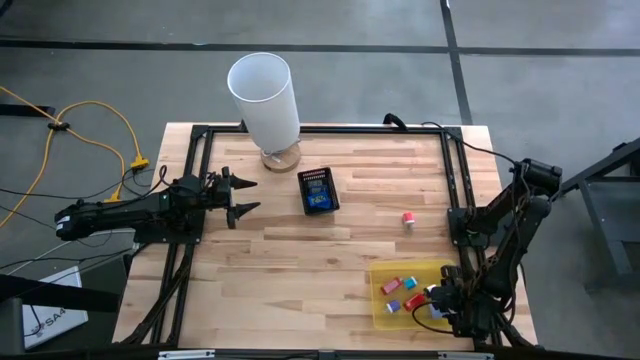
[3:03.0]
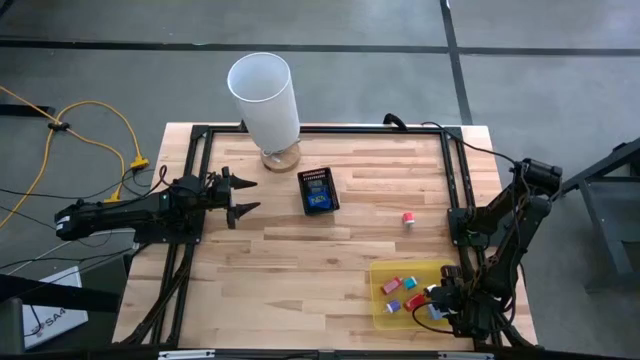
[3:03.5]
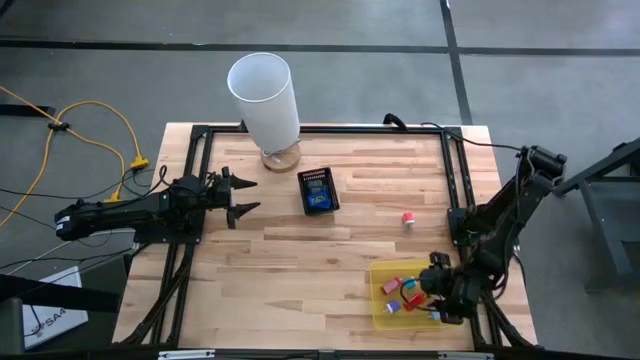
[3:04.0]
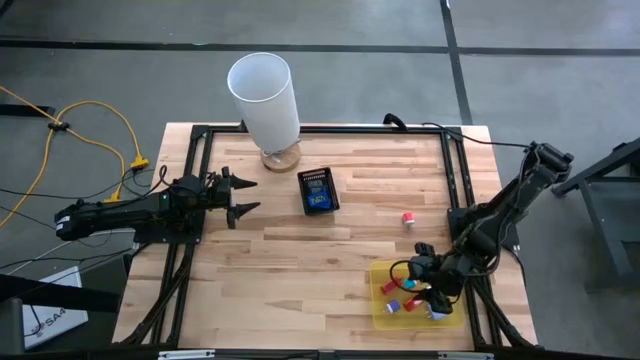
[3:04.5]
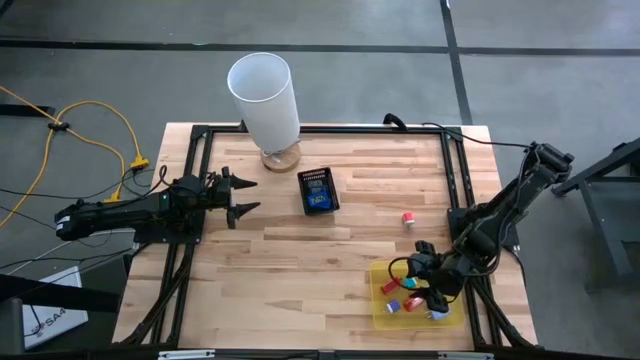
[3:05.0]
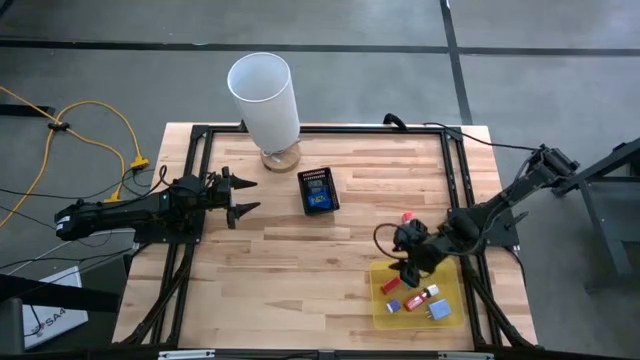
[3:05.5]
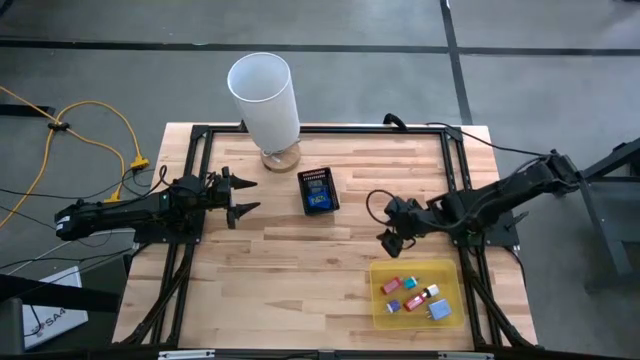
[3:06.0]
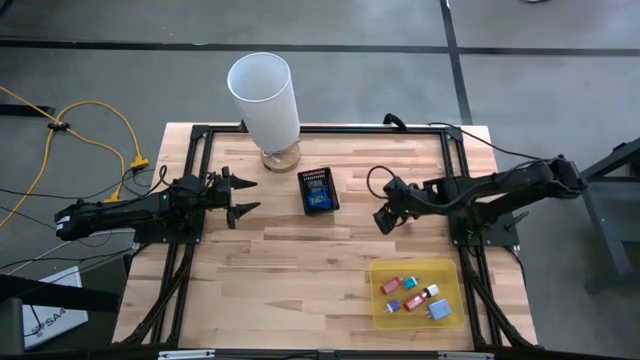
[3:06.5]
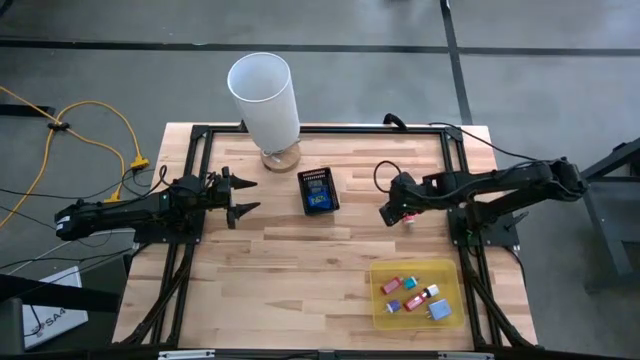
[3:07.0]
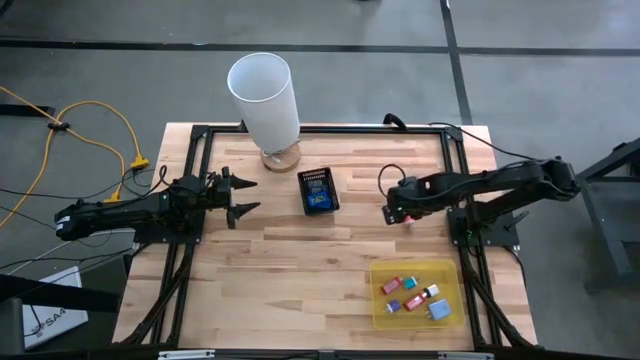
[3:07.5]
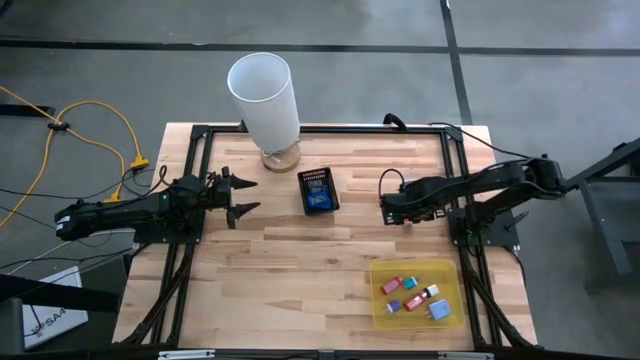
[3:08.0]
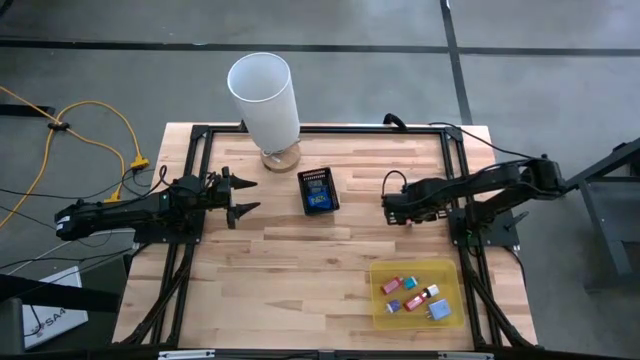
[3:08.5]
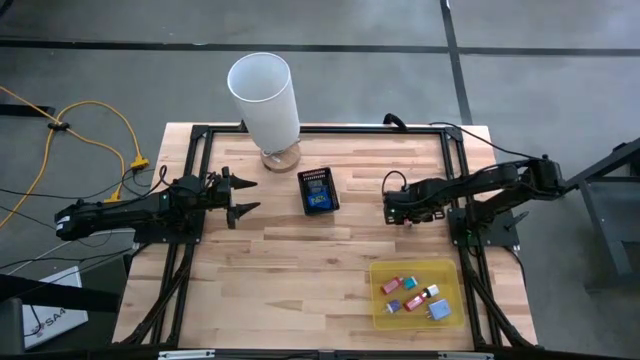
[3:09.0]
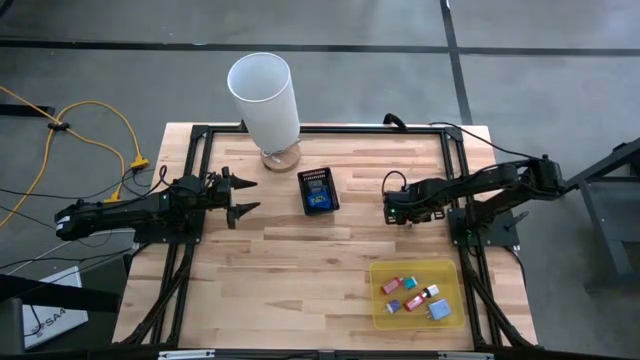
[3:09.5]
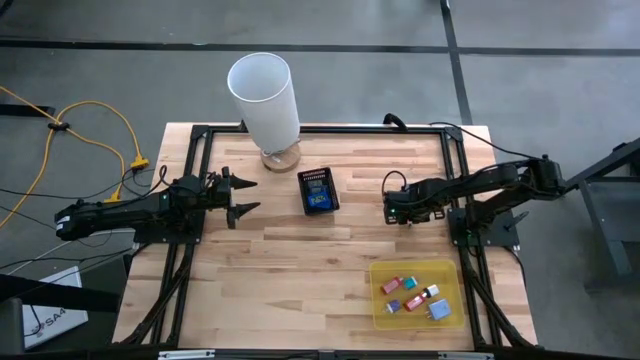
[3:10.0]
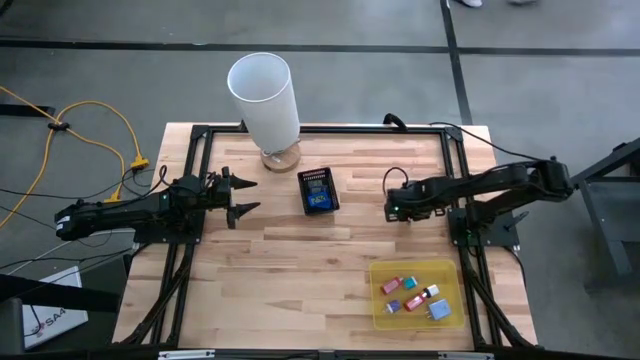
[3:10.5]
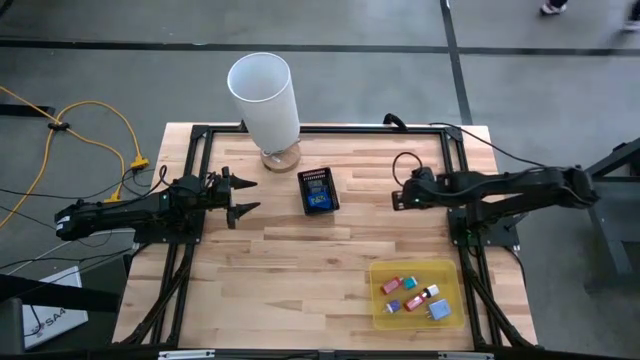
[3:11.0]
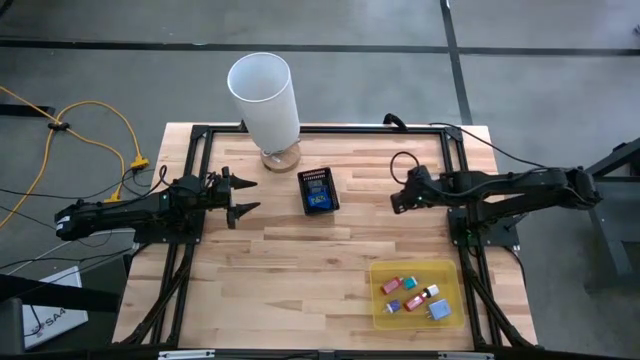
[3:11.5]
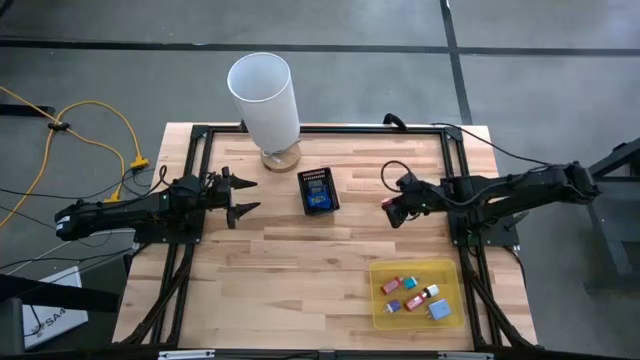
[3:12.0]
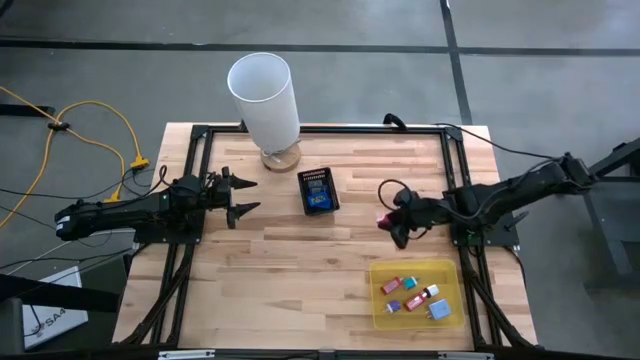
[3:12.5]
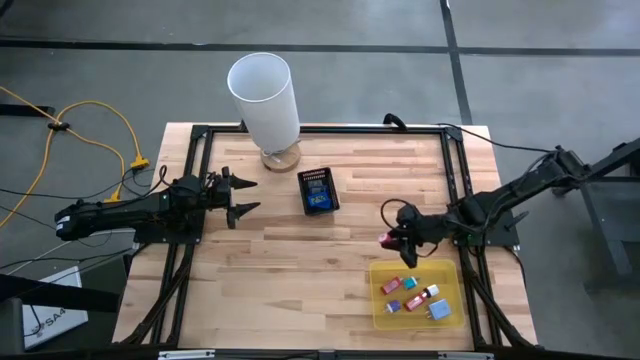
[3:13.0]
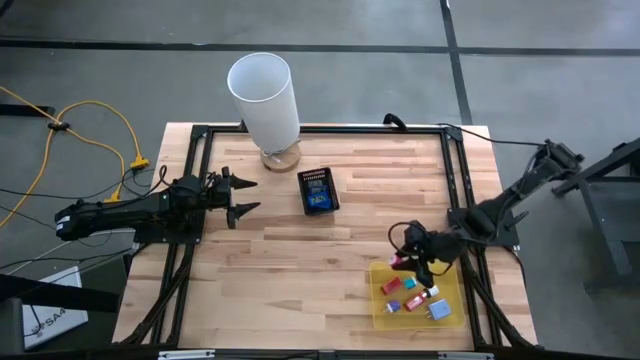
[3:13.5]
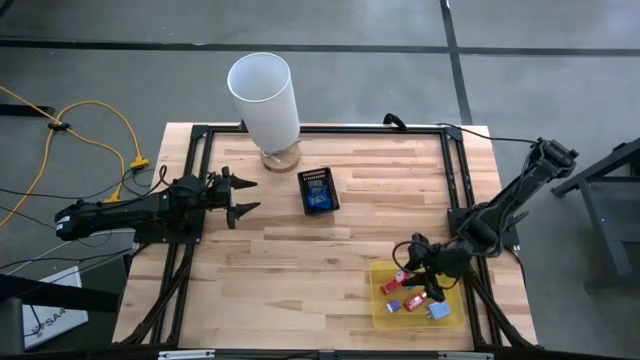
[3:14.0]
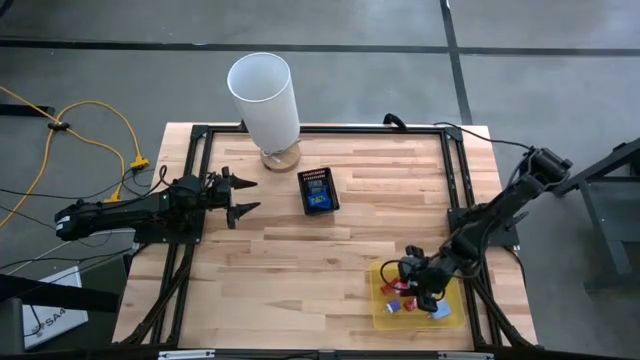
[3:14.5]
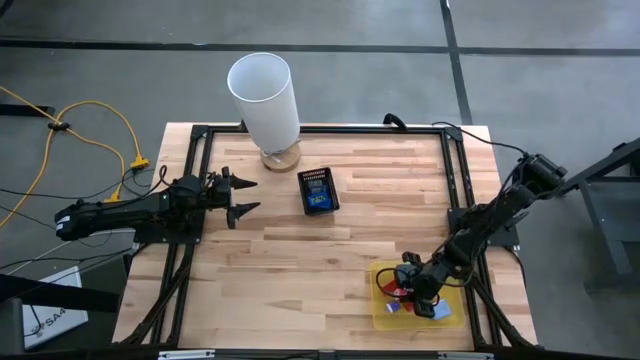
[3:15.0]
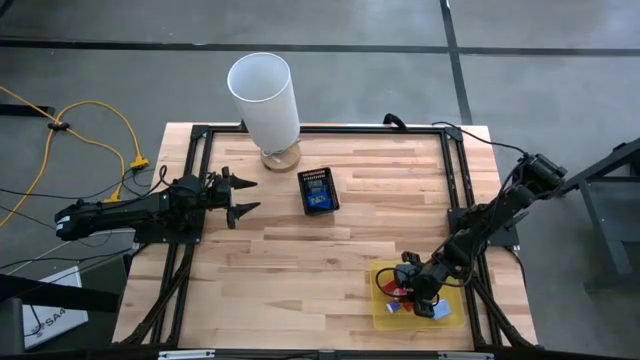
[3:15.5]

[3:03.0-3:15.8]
Task: Pick & Place Office items
Put the pink charger adaptor into the yellow bin

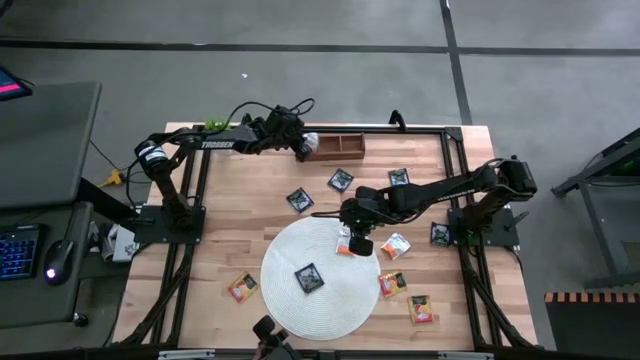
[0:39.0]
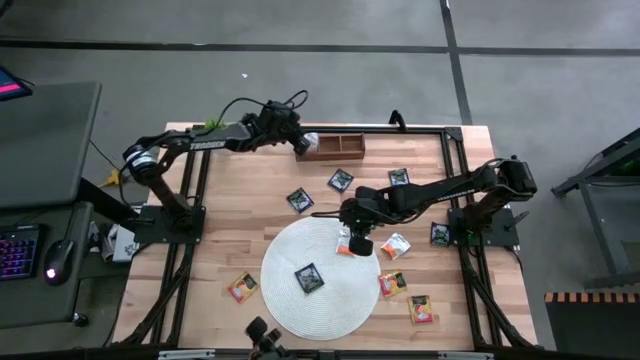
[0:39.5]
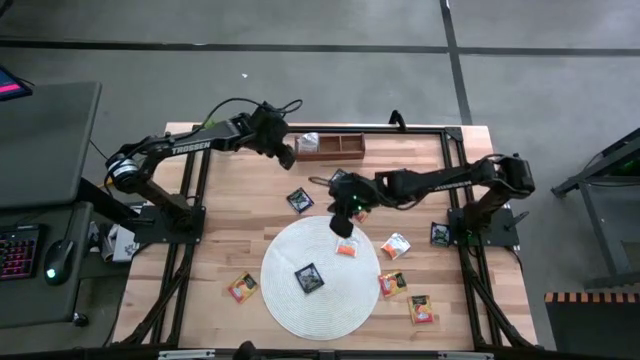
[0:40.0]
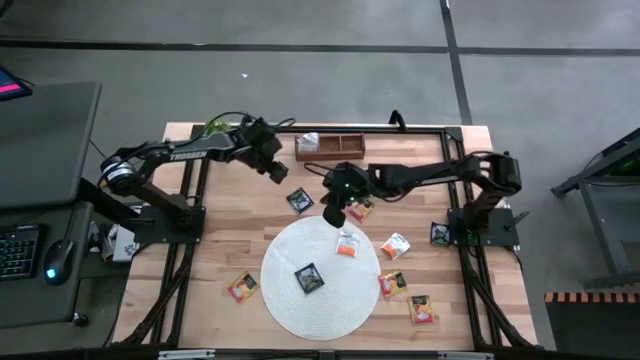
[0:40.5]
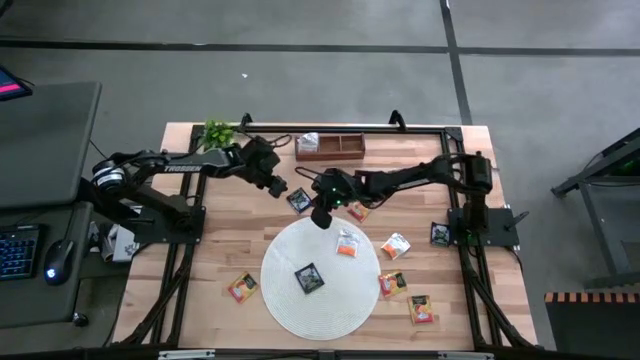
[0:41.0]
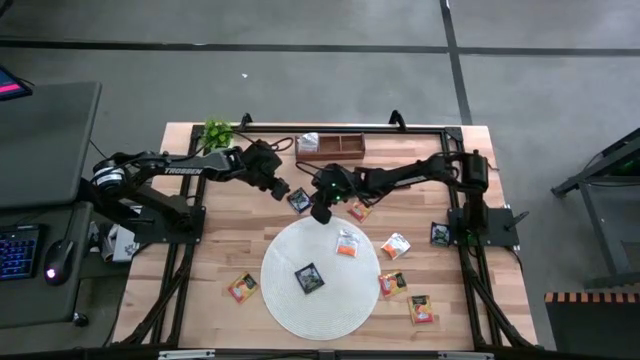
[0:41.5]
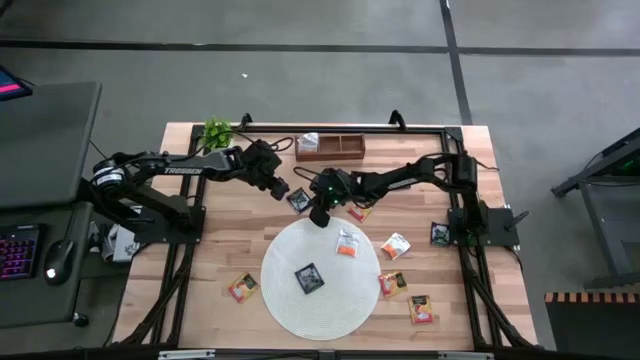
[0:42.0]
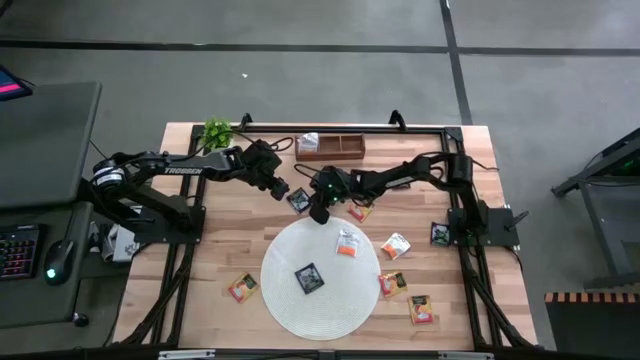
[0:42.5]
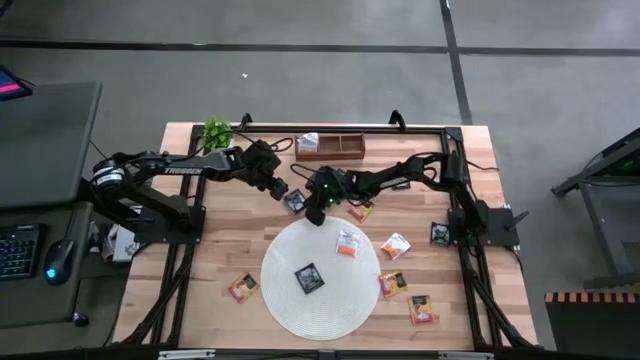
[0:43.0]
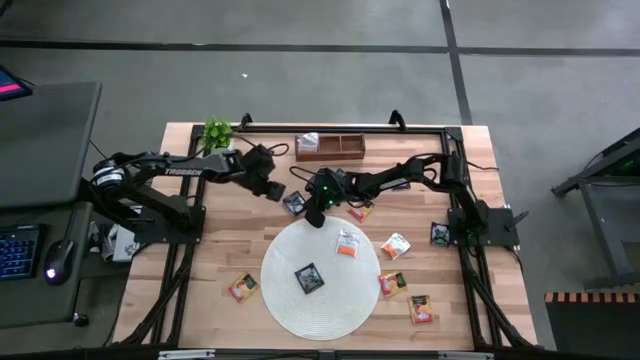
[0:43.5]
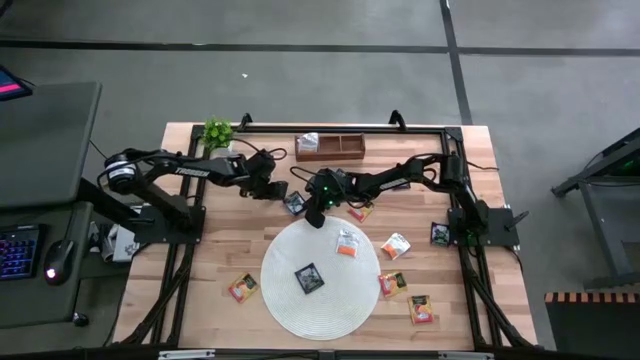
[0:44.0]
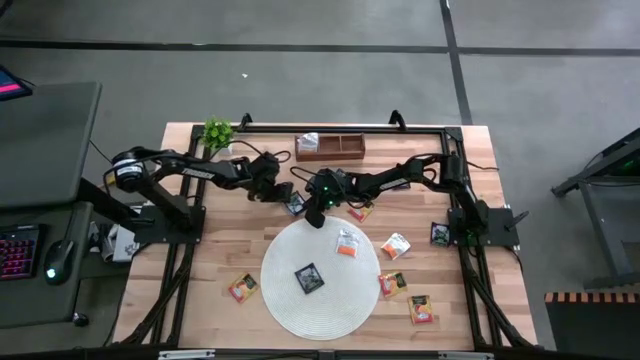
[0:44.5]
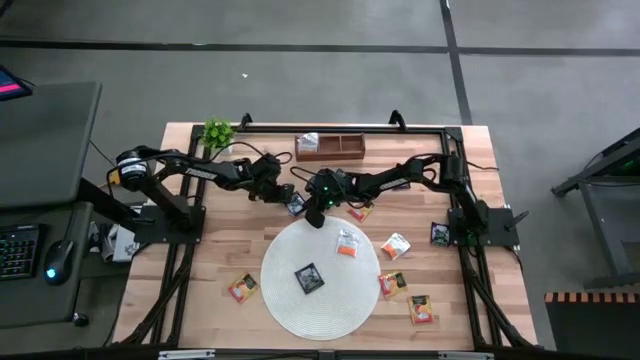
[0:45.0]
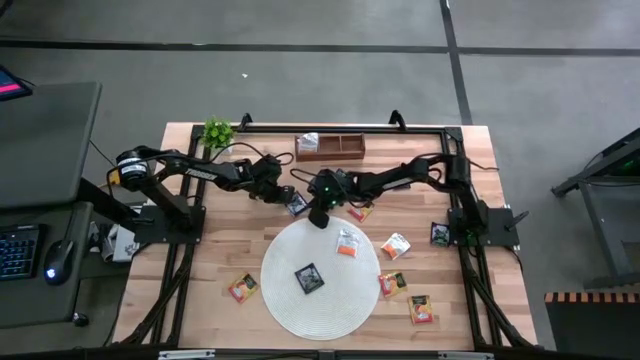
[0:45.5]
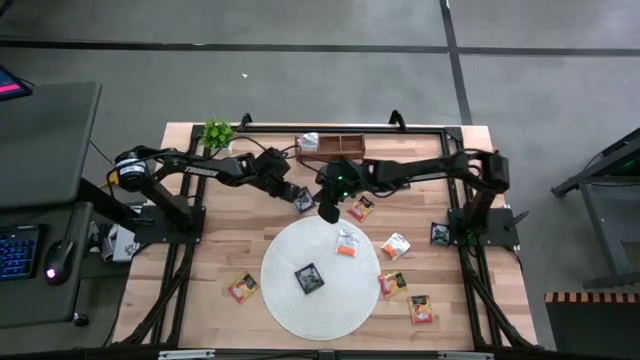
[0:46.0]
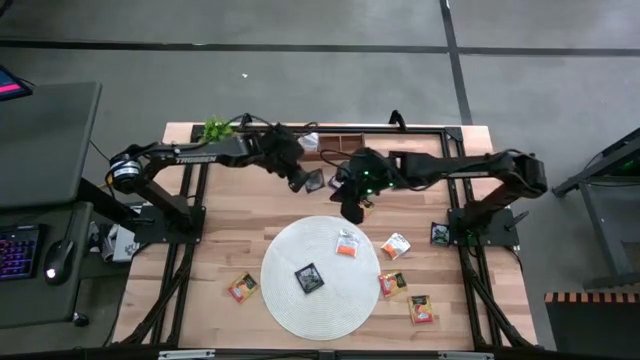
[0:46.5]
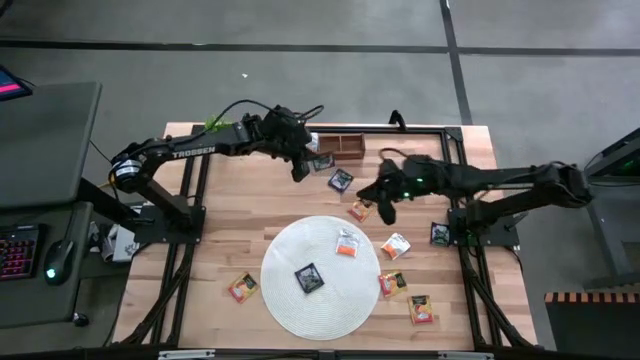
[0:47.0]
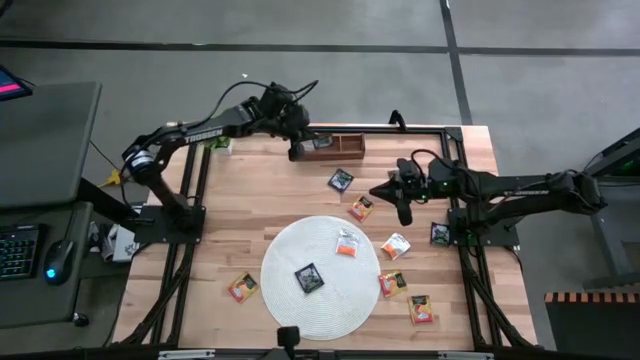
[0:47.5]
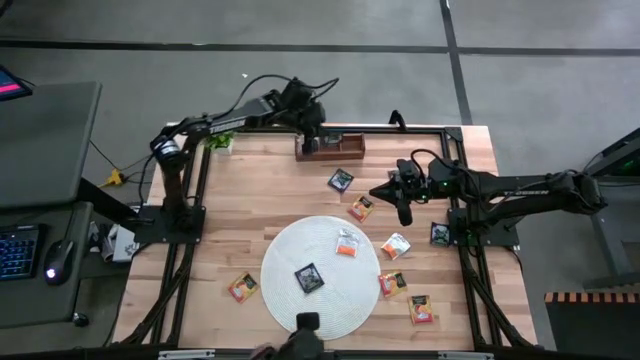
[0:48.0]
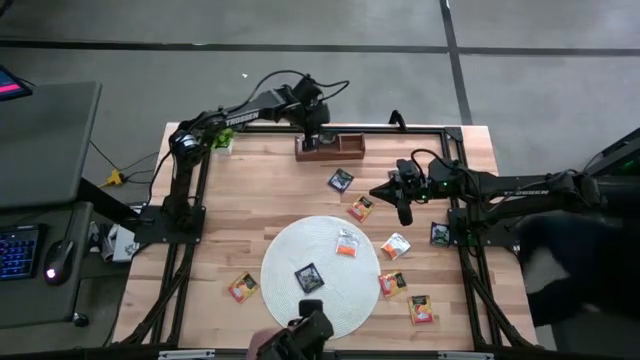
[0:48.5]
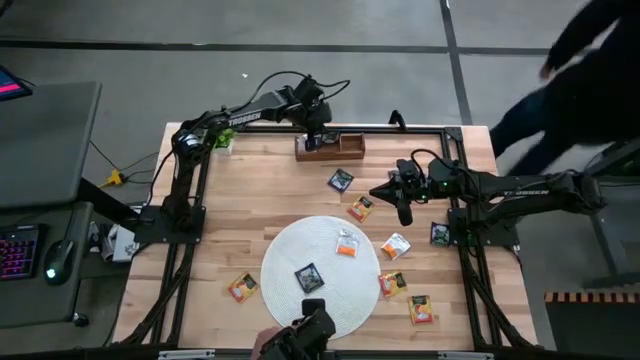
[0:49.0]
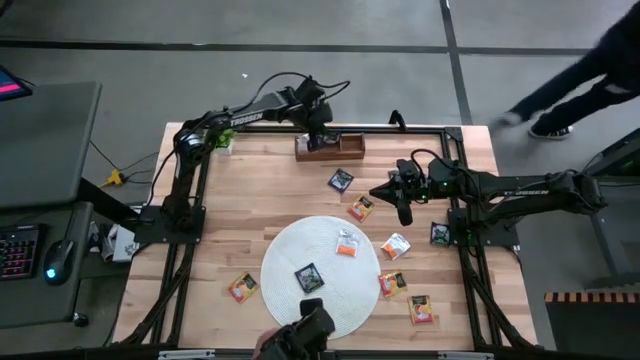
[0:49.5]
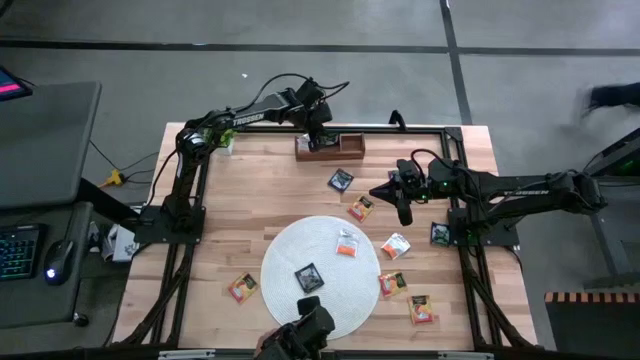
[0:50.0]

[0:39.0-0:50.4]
Task: Pick & Place Tea
Put the blue tea bag into the middle section of the wooden organizer
